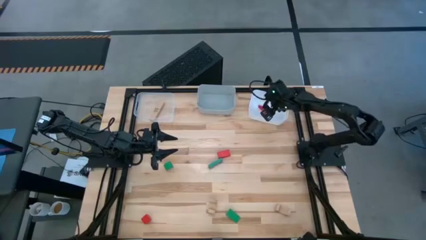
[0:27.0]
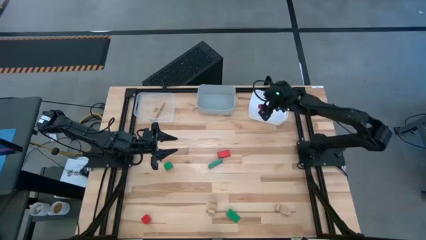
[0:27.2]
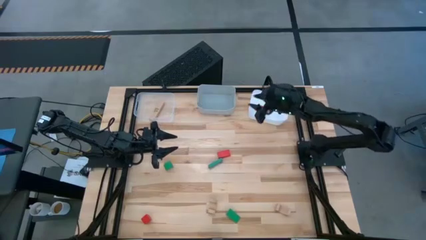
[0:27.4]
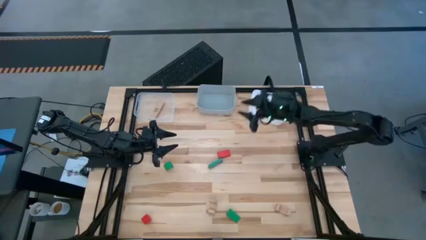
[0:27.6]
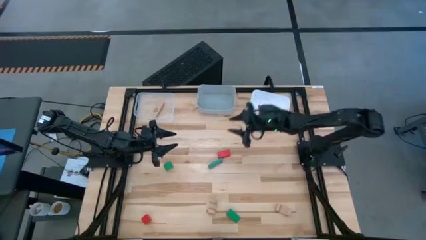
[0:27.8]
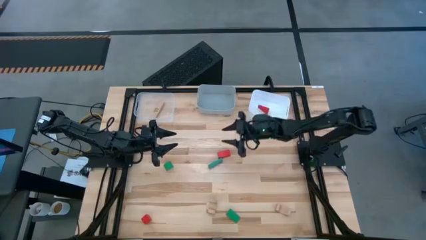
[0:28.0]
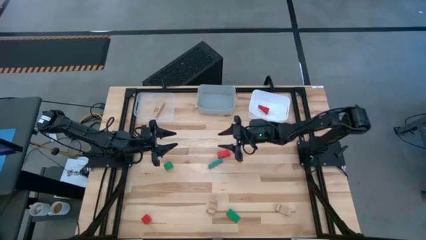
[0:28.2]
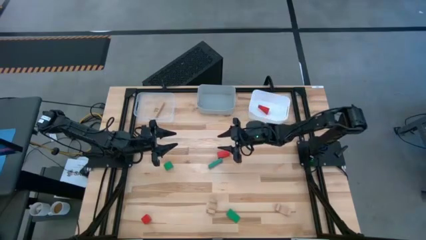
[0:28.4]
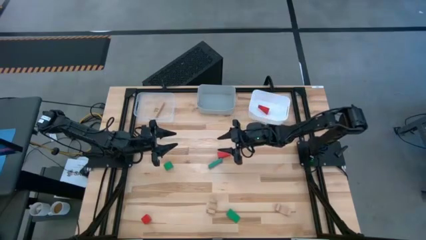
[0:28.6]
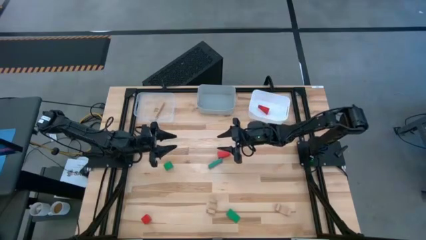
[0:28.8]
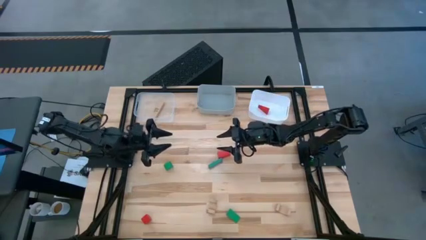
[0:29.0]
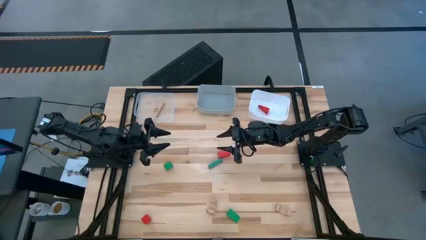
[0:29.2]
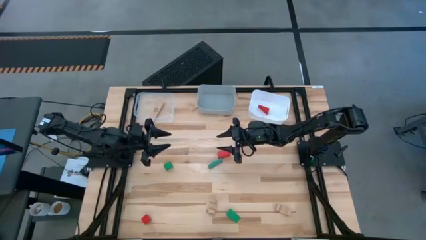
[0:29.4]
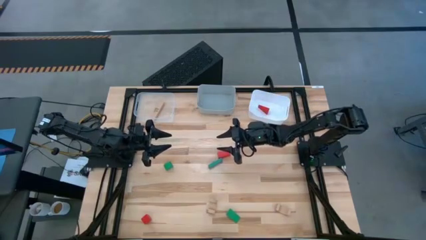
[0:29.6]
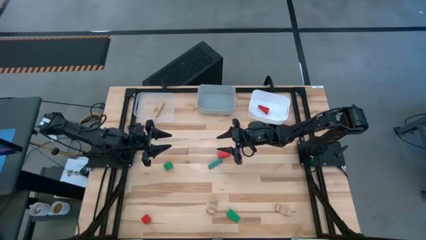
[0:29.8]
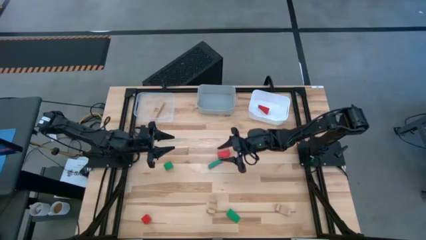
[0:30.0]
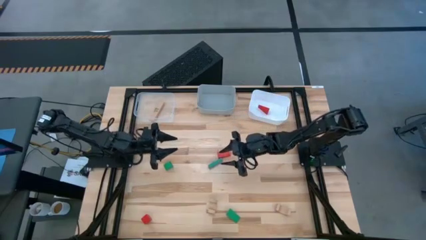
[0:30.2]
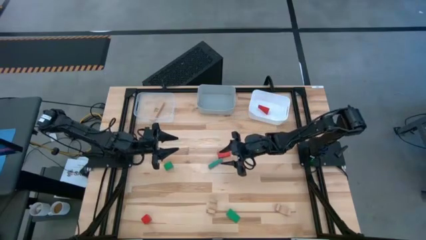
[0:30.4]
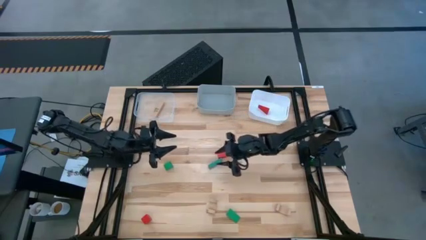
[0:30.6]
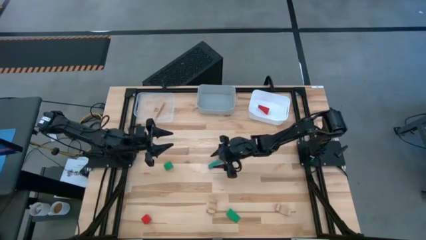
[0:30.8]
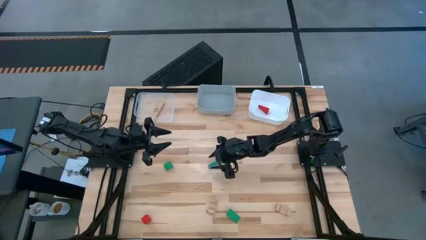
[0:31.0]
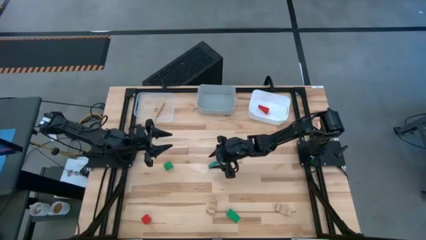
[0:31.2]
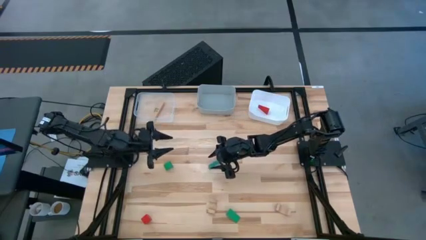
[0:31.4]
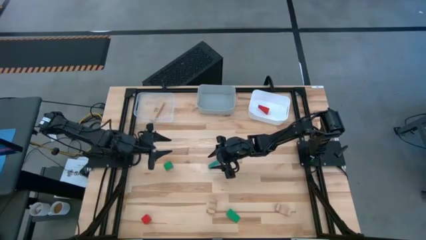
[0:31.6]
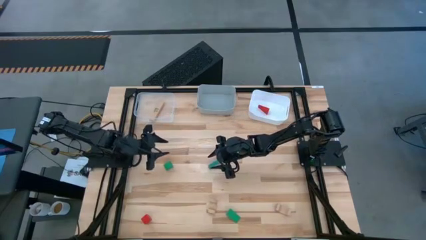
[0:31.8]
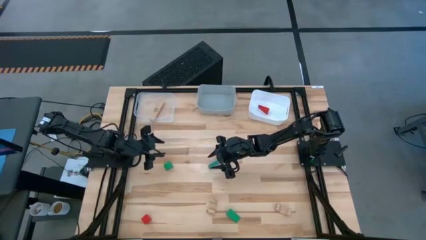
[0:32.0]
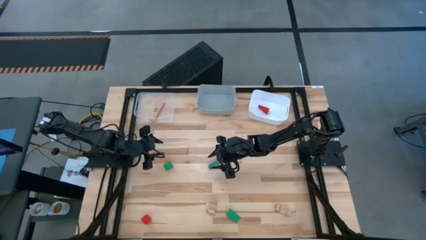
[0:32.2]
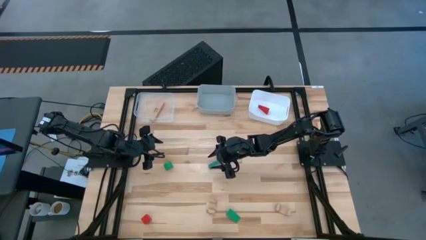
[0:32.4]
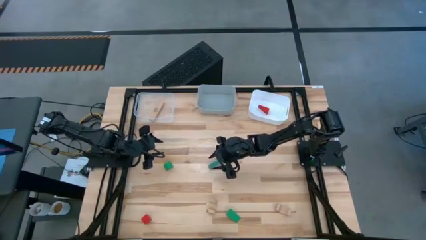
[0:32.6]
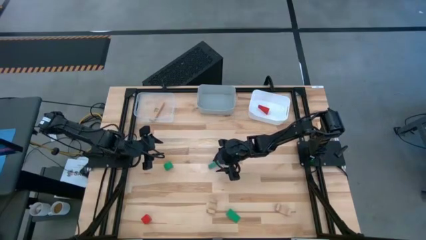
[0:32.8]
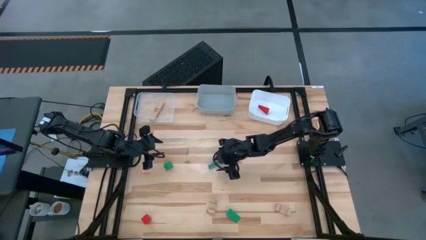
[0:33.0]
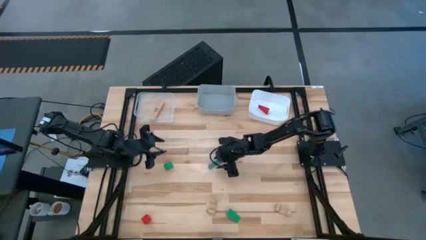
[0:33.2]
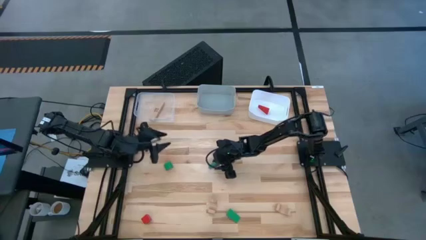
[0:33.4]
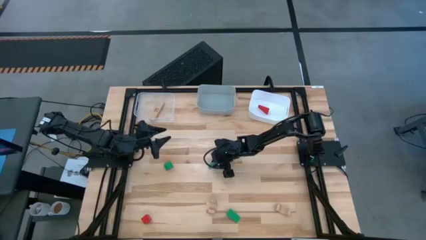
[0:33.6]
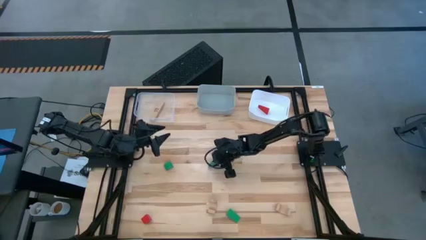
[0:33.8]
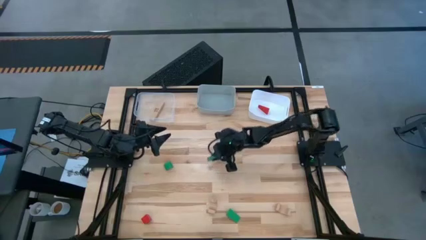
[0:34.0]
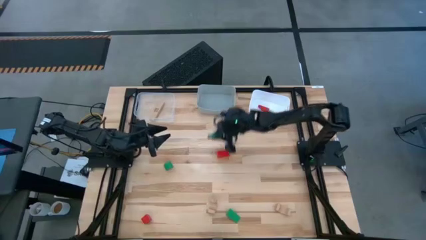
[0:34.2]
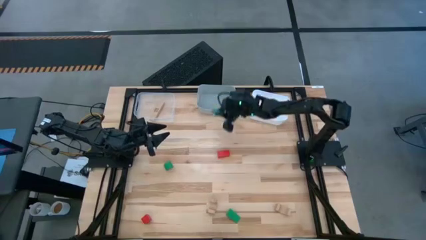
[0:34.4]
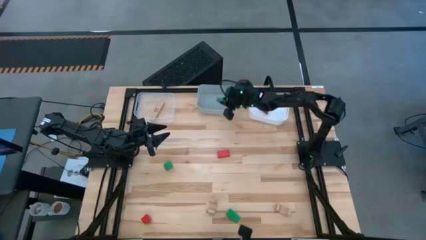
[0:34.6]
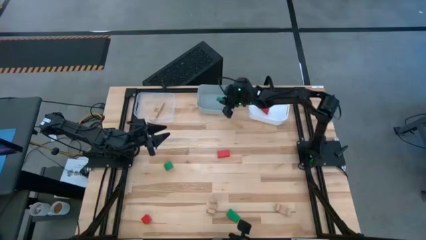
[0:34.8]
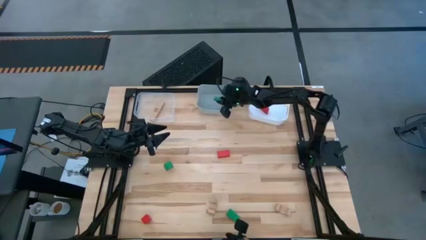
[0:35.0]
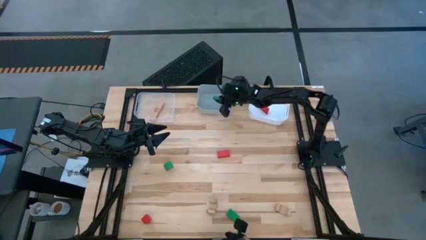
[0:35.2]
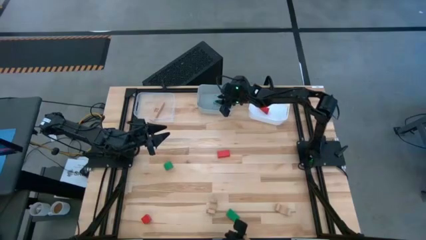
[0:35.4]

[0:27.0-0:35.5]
Task: Sort & place blocks by color
Put the top right green block into the gray bin

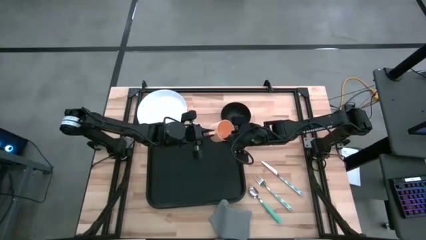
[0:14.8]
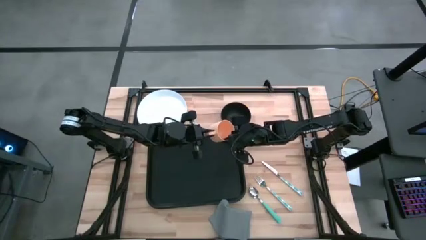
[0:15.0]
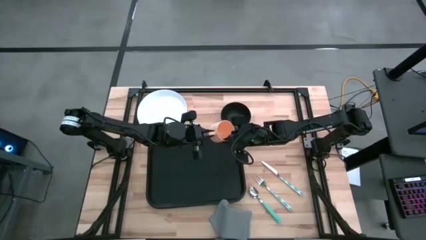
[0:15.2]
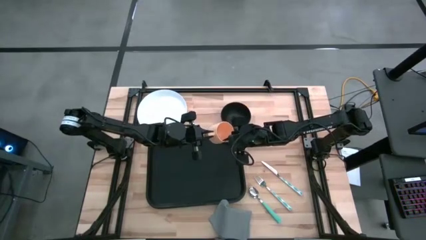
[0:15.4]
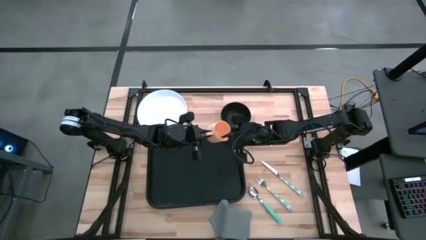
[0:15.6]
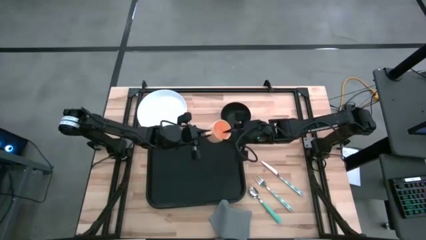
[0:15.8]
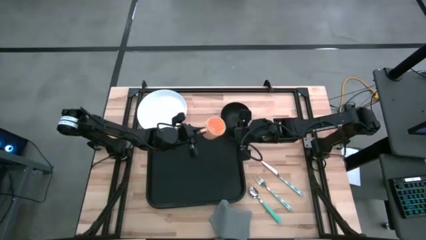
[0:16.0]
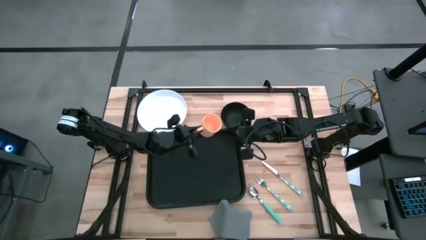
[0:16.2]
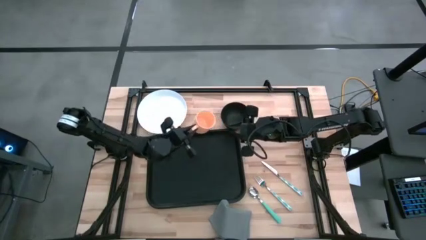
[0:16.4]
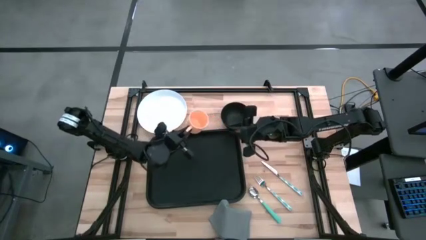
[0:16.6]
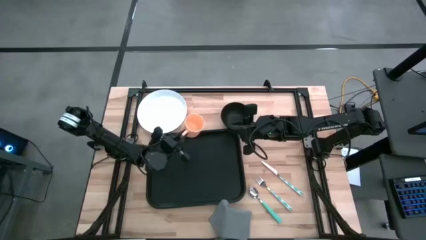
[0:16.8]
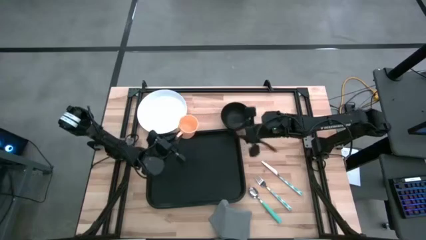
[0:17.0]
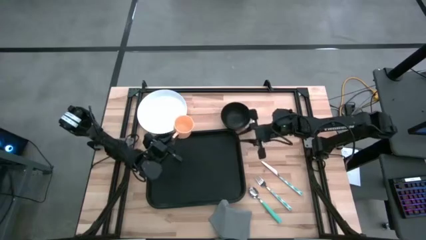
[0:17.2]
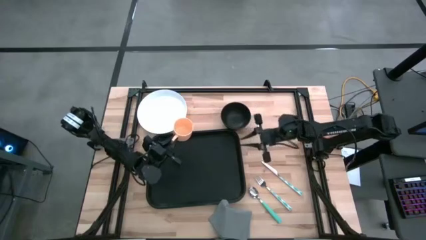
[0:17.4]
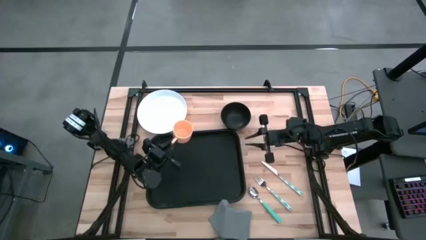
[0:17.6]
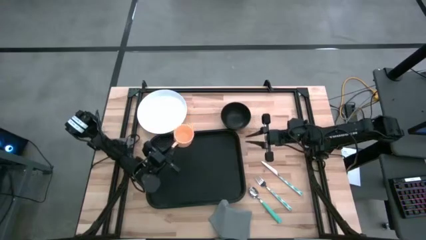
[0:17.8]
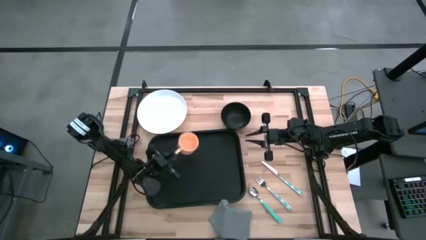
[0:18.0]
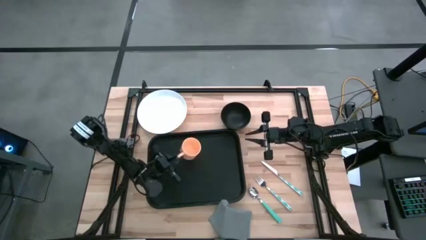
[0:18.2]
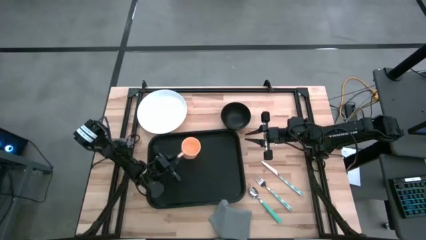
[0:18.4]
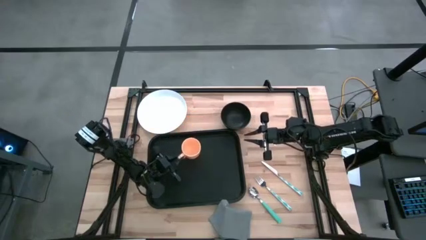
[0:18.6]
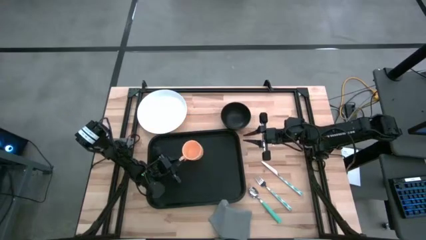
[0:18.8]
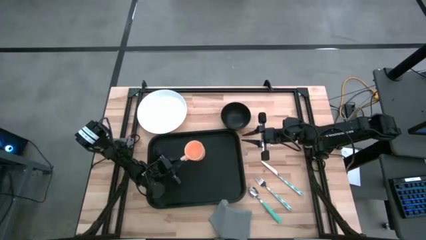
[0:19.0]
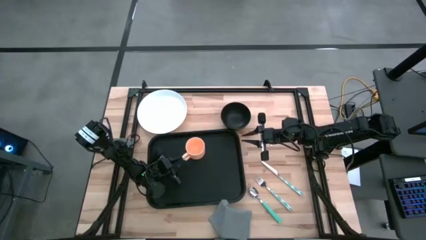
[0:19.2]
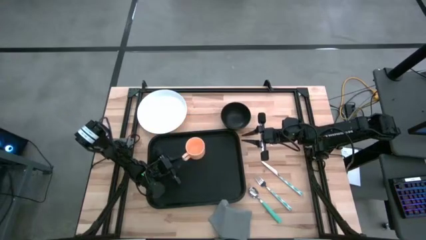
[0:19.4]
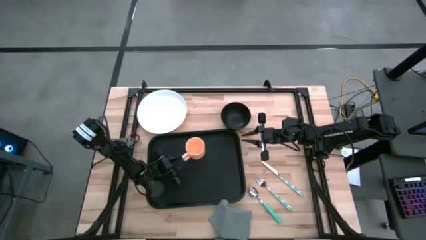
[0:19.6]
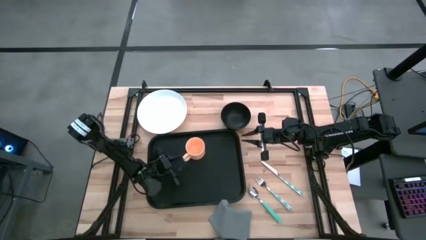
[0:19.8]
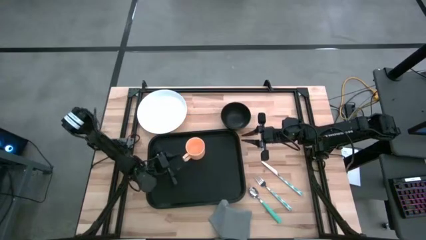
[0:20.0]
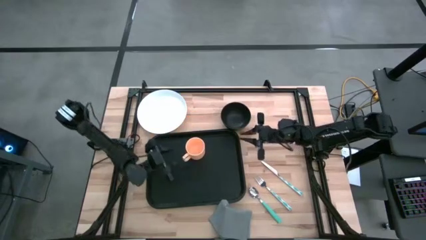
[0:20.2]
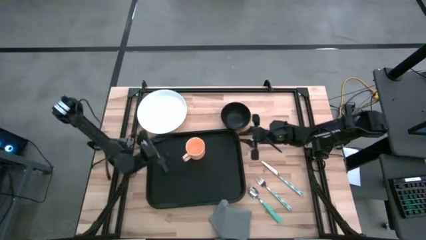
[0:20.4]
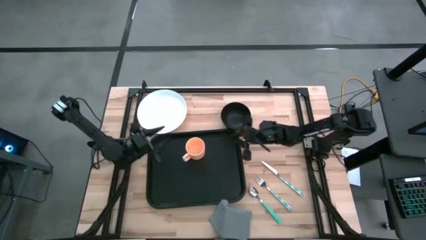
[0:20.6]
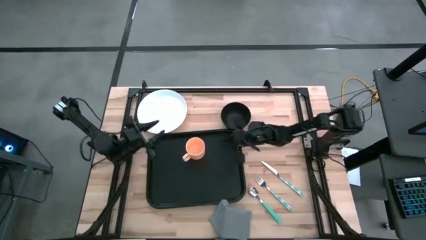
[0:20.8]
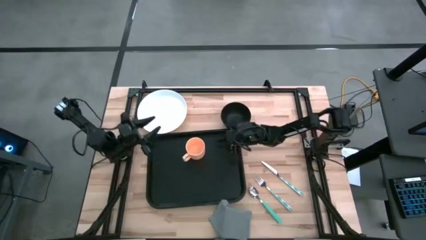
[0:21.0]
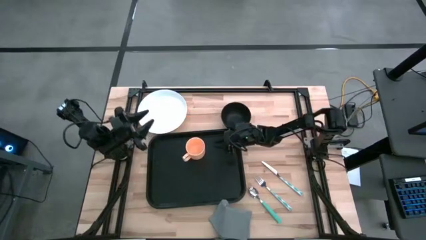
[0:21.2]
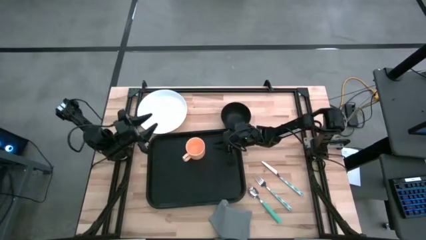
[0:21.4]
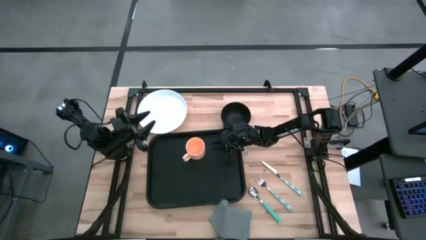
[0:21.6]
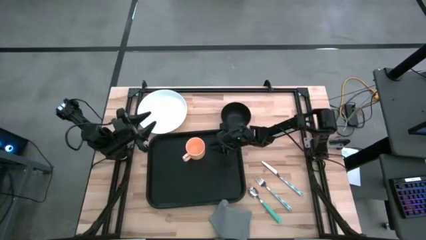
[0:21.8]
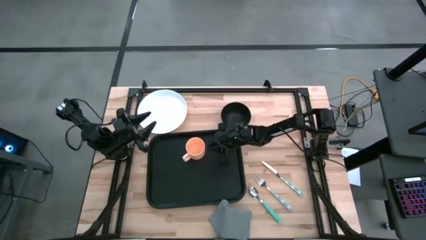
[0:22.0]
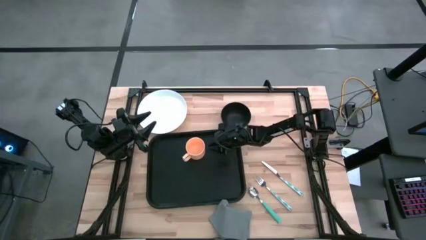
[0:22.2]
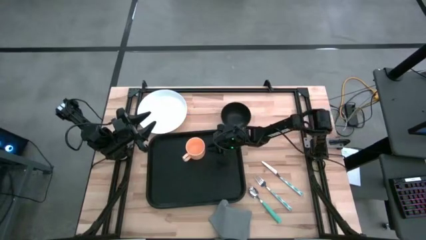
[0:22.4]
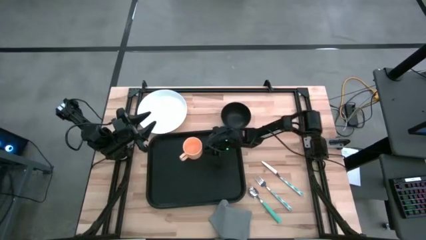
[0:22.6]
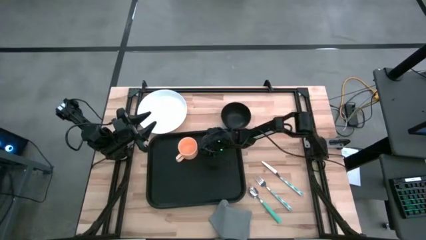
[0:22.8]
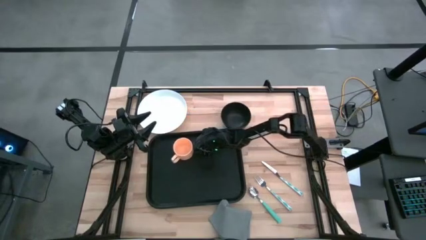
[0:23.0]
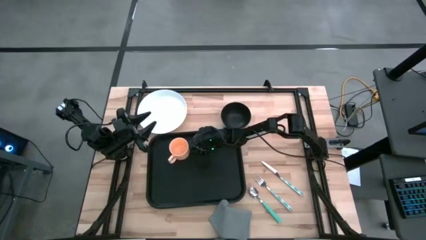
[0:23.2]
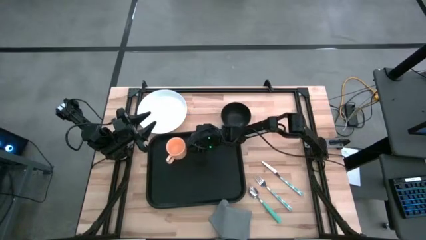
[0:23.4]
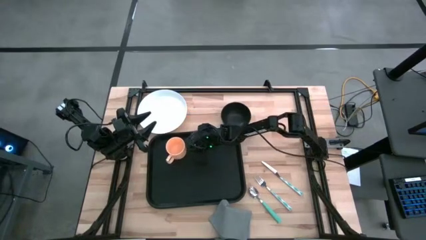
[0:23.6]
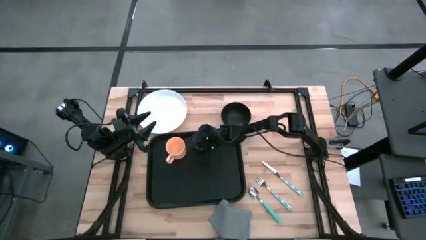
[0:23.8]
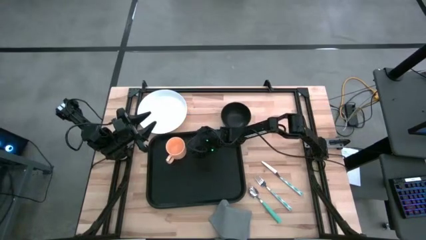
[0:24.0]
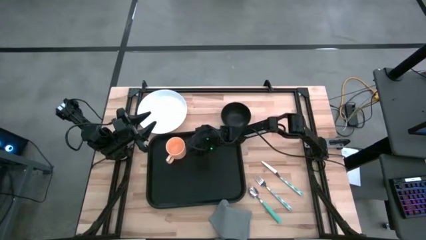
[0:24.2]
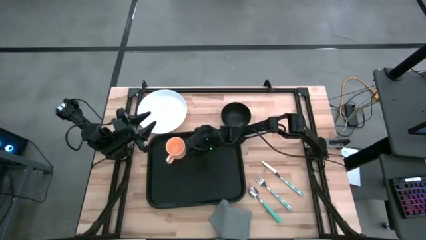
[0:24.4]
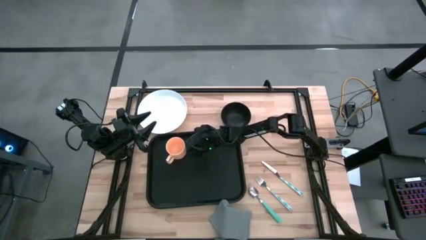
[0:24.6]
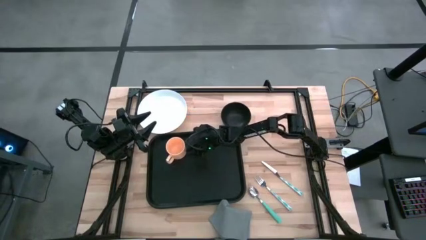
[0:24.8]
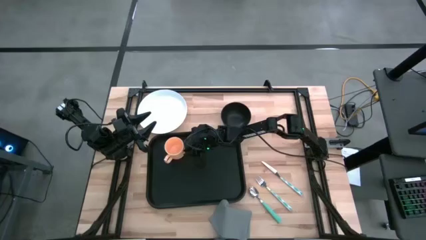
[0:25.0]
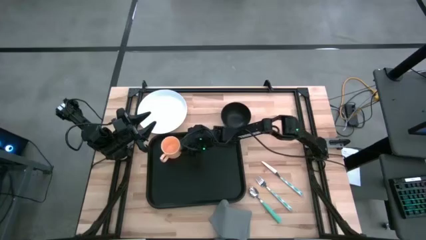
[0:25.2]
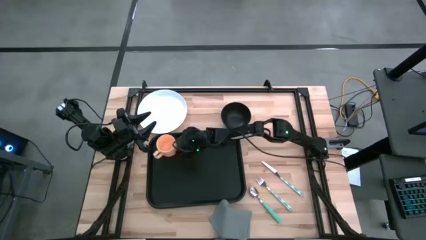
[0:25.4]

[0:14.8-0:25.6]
Task: Set up tray
Put the orange mug on the black tray
